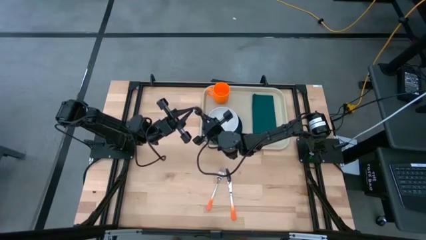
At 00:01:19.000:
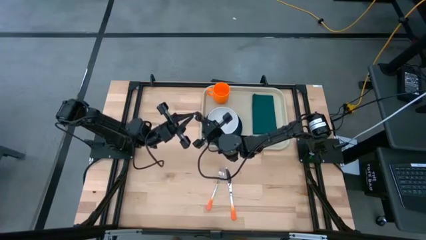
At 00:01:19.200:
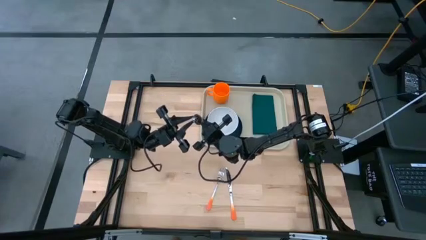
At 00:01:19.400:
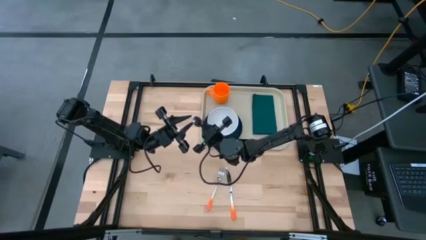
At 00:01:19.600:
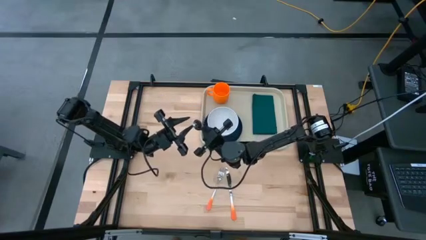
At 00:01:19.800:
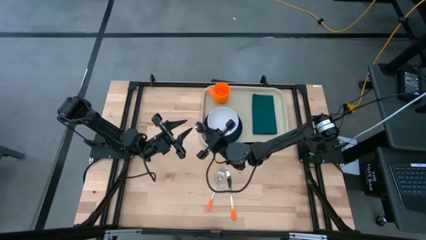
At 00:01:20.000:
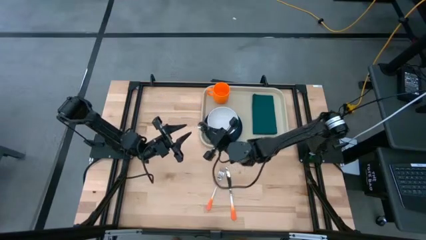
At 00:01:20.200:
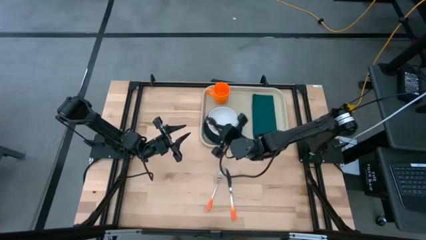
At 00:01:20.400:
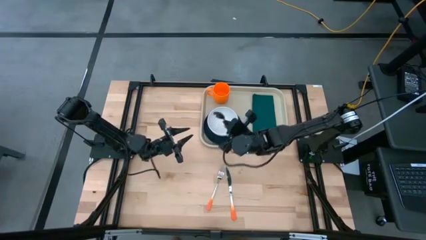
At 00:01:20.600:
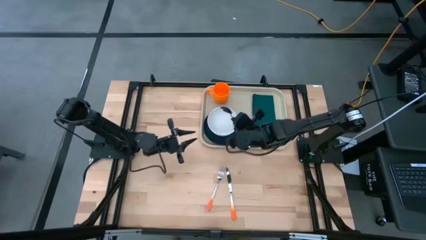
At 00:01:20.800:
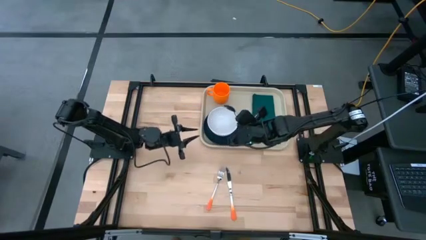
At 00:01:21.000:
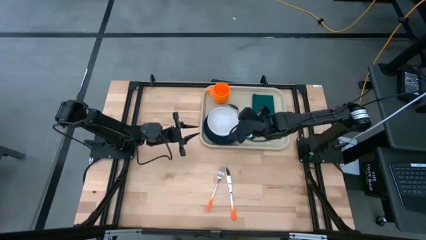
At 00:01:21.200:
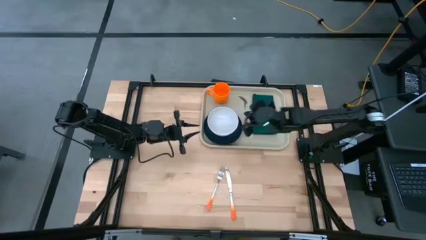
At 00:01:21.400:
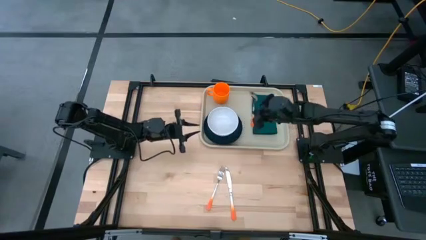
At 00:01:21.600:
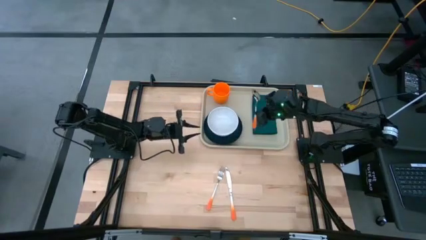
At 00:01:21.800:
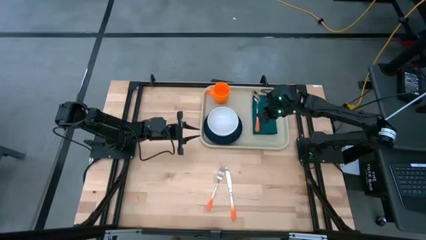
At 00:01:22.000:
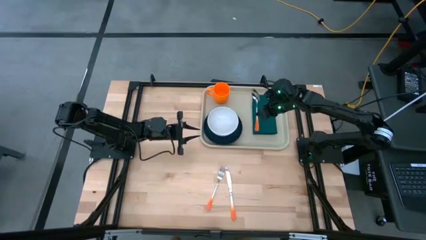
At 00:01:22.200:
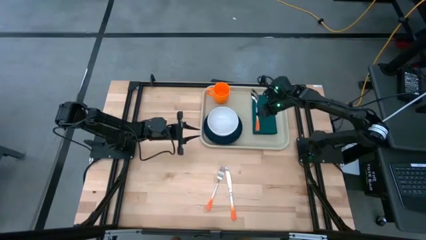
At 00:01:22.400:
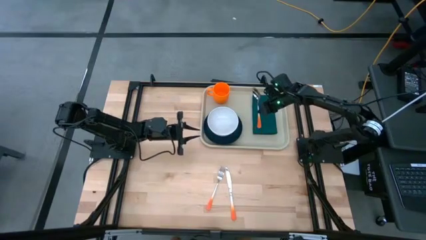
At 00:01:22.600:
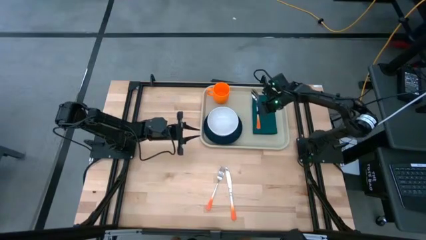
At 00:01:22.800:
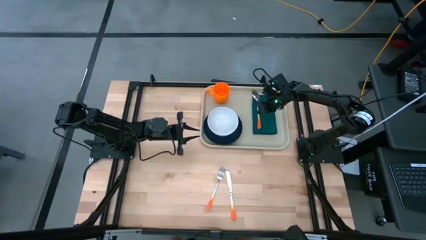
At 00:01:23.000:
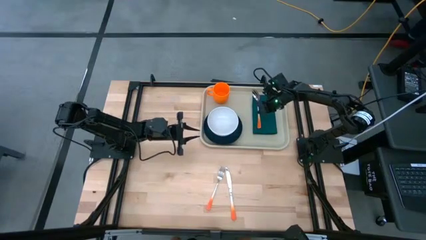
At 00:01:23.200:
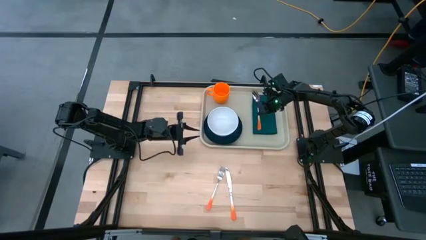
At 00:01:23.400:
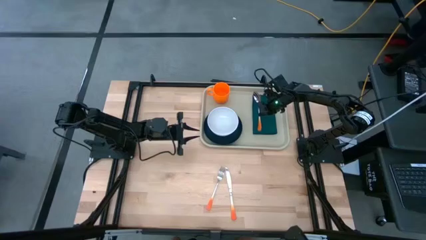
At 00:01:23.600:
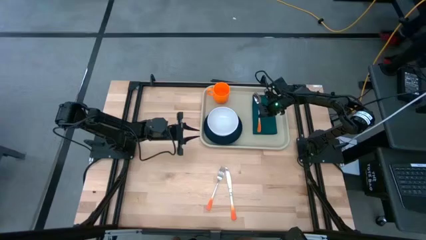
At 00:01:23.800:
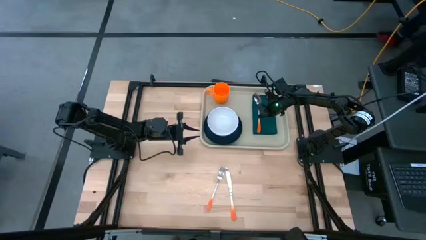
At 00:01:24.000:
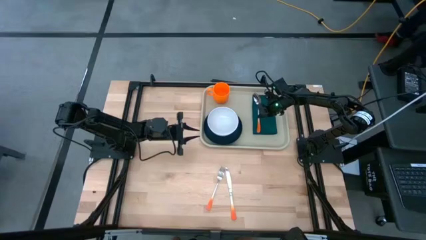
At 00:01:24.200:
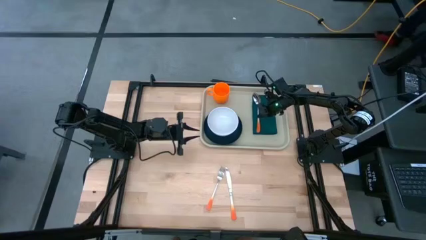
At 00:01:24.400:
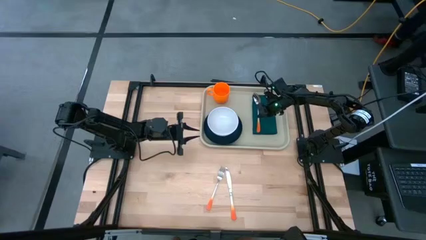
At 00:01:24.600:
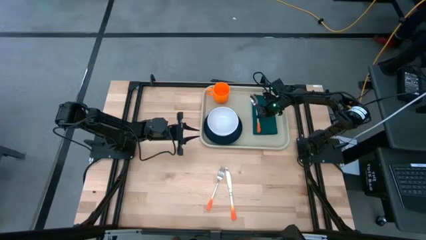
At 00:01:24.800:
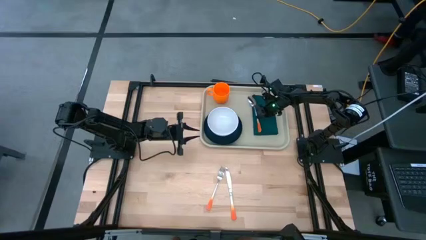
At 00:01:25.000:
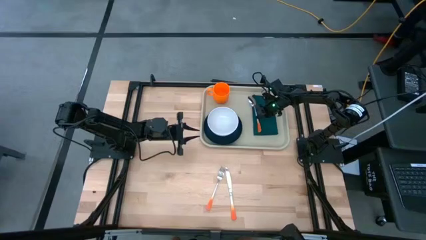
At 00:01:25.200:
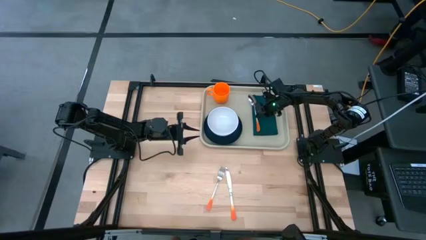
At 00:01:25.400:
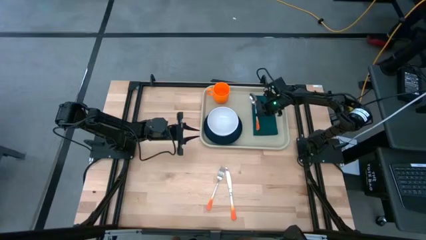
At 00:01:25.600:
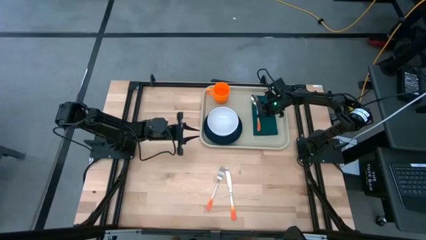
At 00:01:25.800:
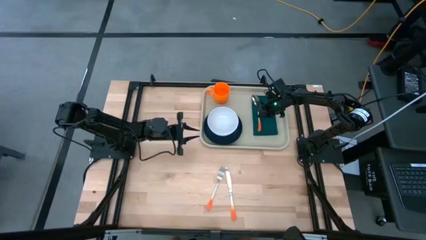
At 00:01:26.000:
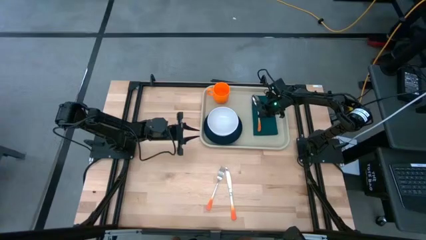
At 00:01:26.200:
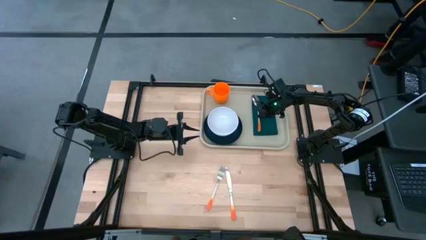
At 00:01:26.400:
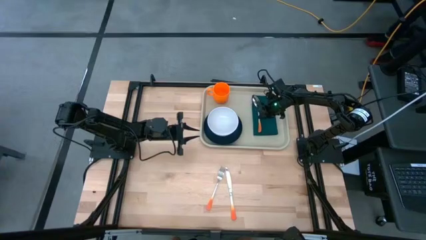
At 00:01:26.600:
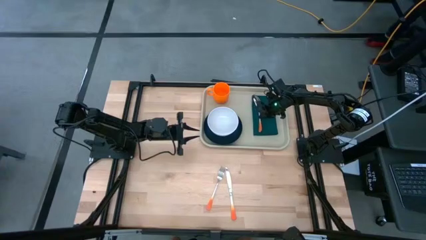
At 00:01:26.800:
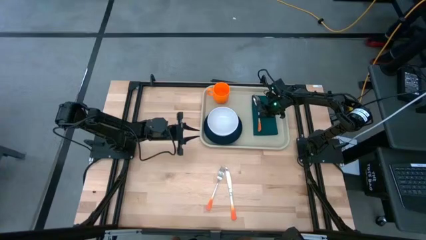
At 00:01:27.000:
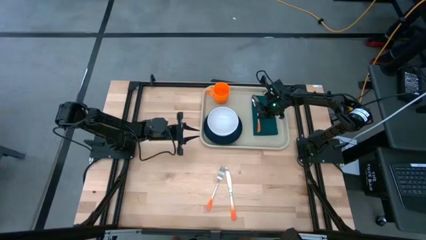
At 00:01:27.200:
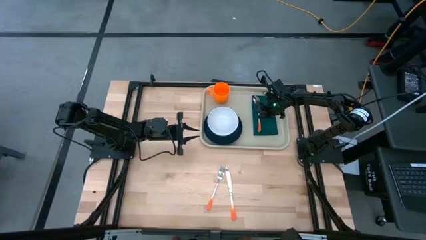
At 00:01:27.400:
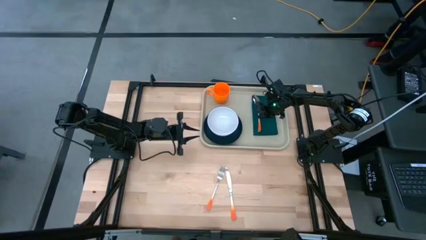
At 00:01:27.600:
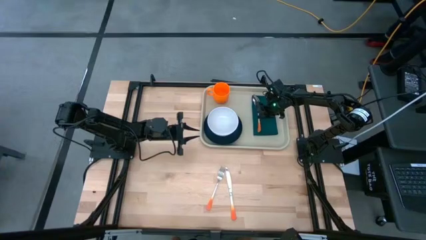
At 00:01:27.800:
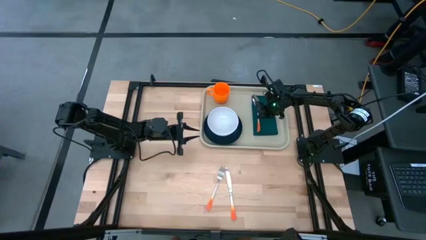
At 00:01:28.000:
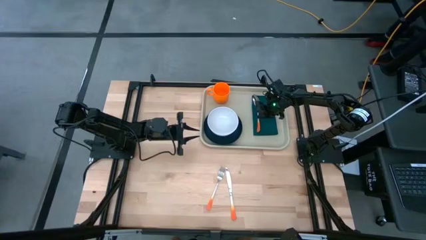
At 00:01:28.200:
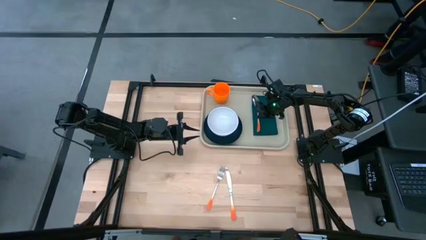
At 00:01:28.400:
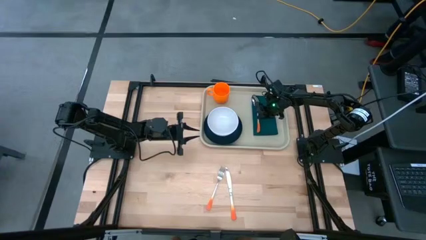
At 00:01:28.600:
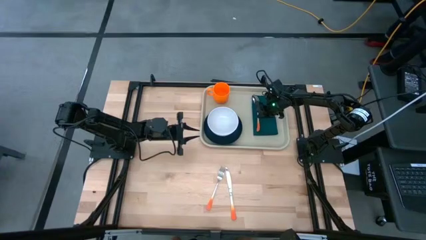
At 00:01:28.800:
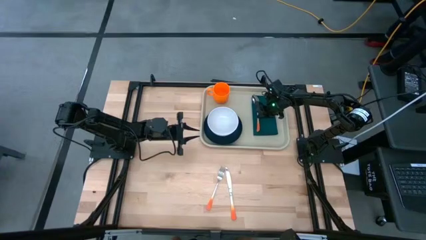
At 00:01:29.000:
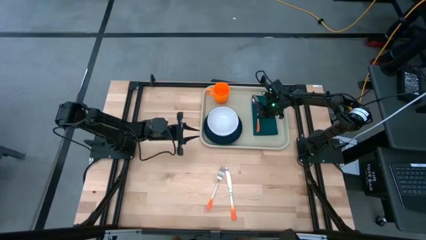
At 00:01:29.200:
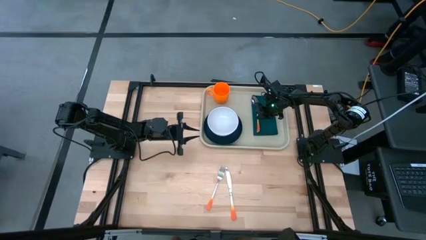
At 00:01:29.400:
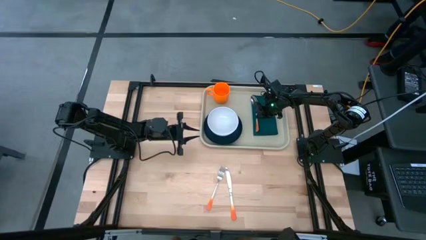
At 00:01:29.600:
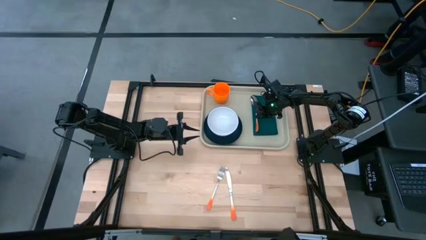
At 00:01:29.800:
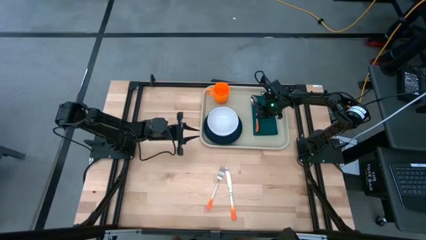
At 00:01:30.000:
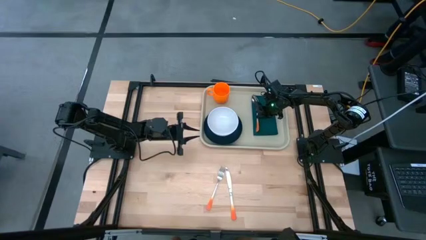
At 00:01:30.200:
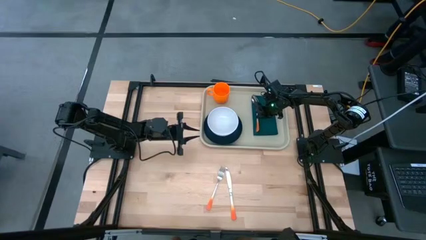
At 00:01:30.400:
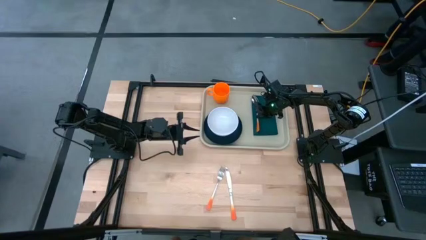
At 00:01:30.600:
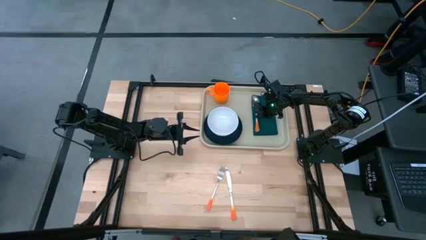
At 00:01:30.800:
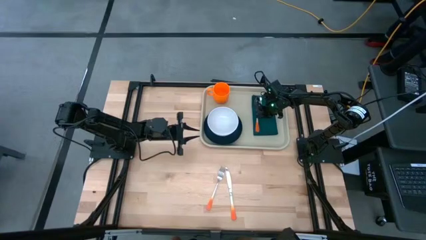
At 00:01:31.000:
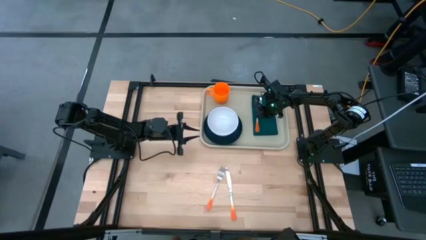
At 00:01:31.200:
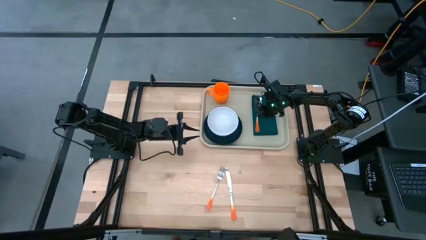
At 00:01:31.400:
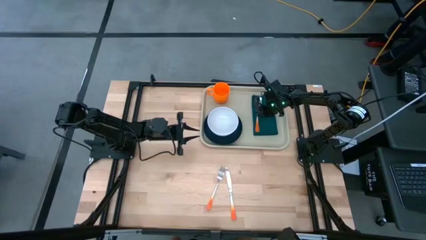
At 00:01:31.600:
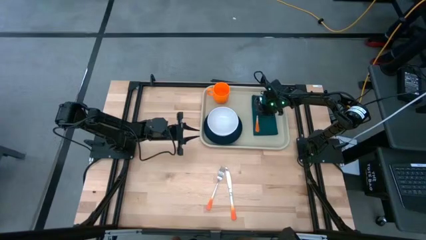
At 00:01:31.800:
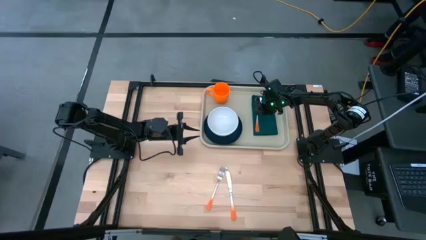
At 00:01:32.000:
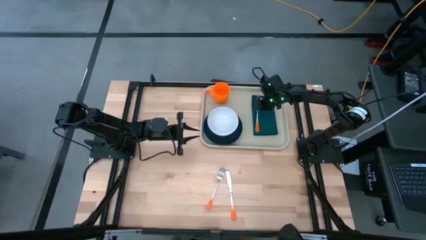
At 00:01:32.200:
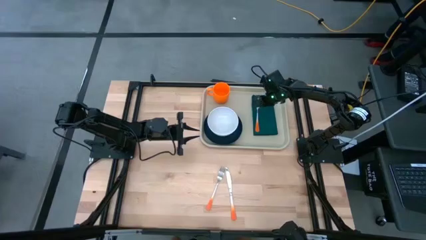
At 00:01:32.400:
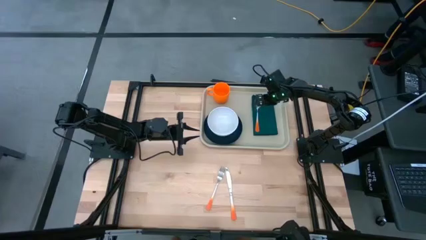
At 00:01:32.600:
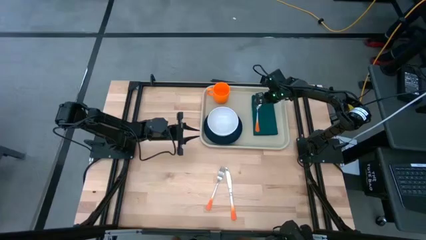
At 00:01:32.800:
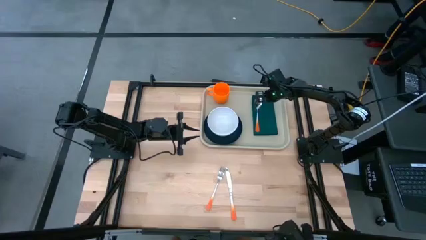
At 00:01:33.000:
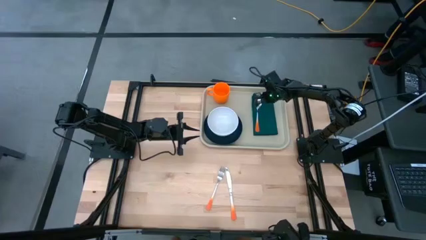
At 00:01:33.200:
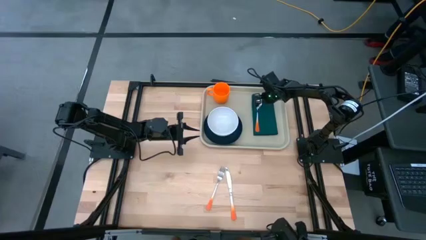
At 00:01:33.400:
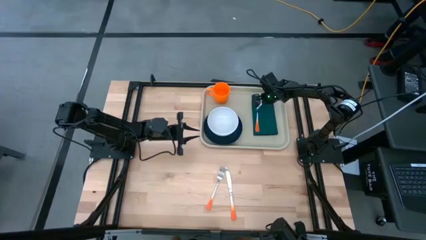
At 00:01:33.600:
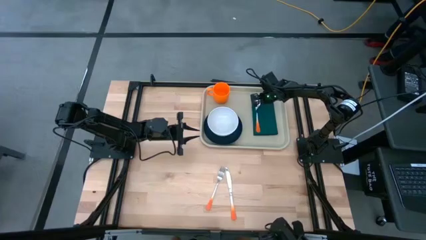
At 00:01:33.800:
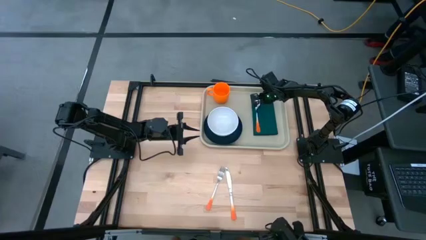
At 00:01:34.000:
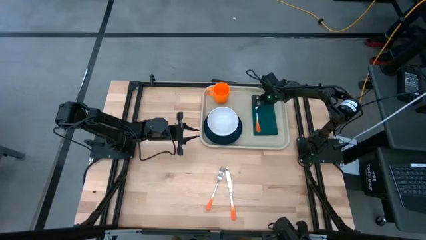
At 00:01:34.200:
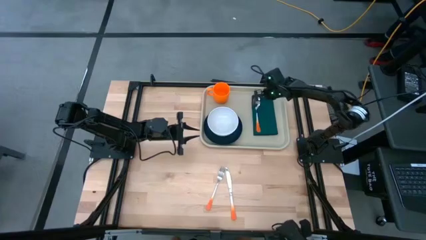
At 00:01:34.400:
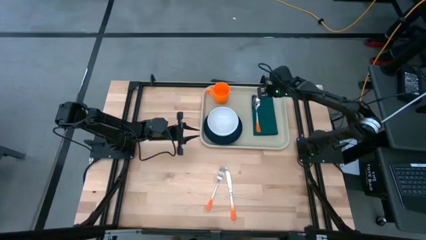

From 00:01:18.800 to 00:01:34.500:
Task: Set up tray
Put the orange spoon on the blue napkin on the serving tray

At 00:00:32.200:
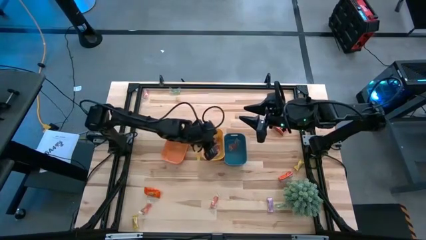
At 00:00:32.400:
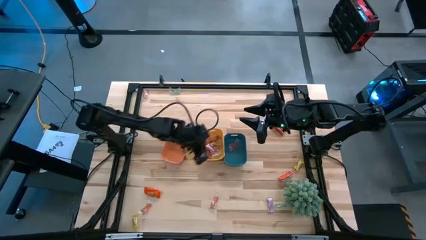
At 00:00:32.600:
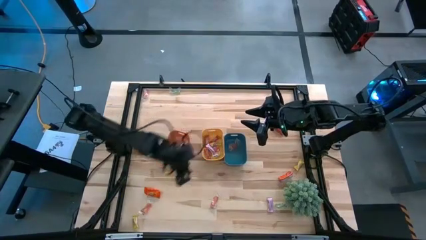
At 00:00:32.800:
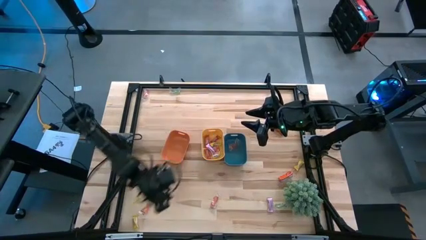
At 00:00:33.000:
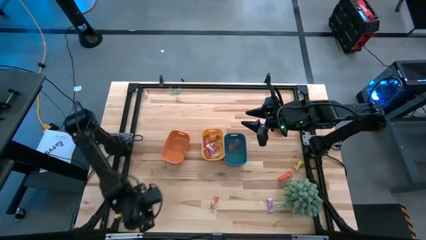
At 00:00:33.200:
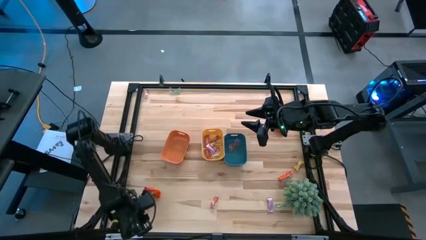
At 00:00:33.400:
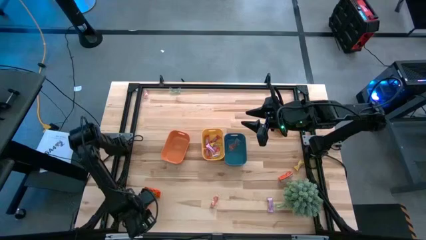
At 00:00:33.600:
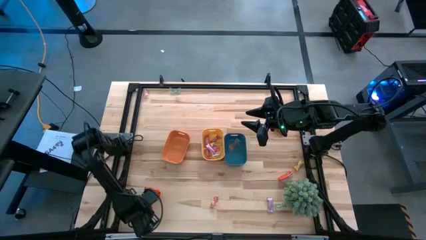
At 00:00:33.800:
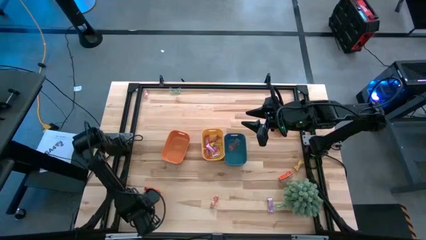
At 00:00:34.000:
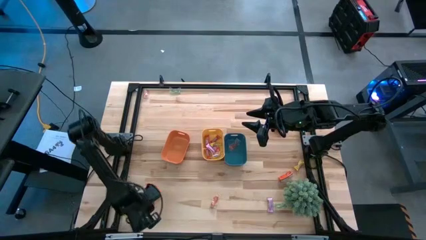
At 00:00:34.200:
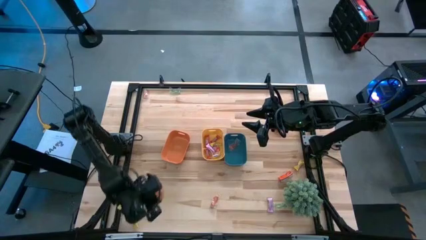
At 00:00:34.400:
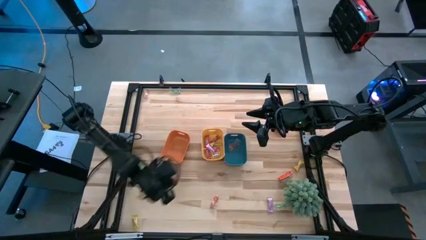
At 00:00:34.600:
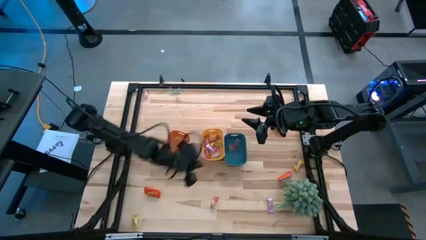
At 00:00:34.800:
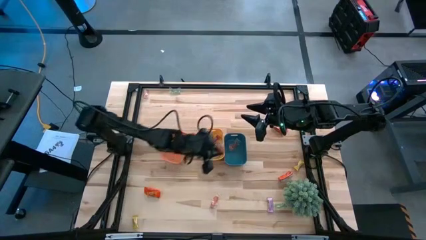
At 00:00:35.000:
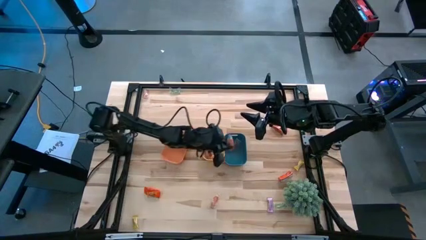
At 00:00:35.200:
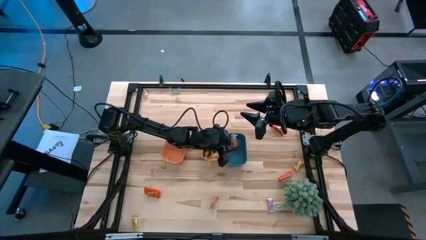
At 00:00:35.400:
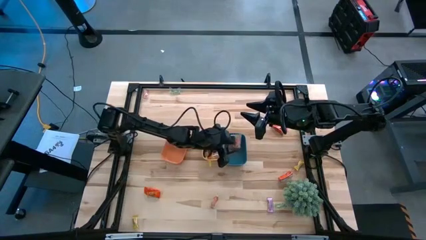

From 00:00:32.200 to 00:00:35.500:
Task: Sort candy
Put the orange gummy into the blue bin
